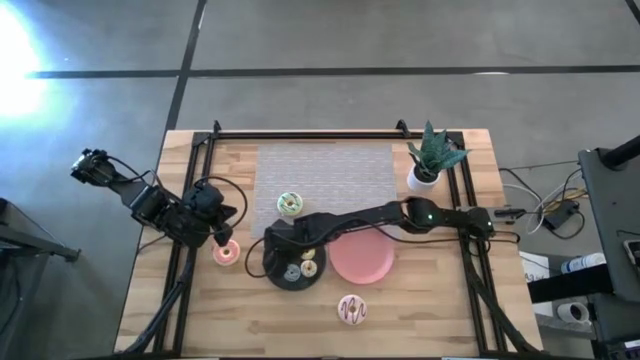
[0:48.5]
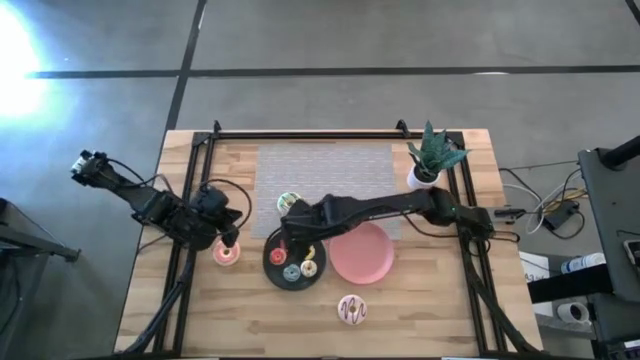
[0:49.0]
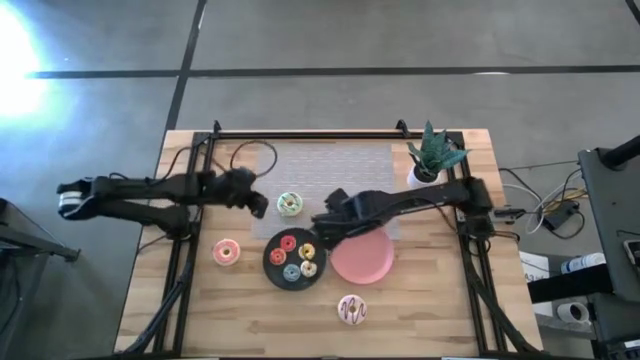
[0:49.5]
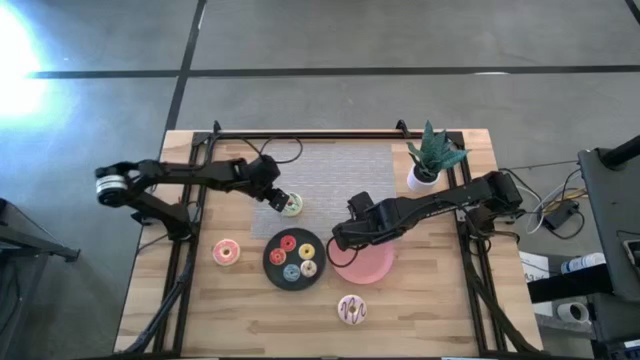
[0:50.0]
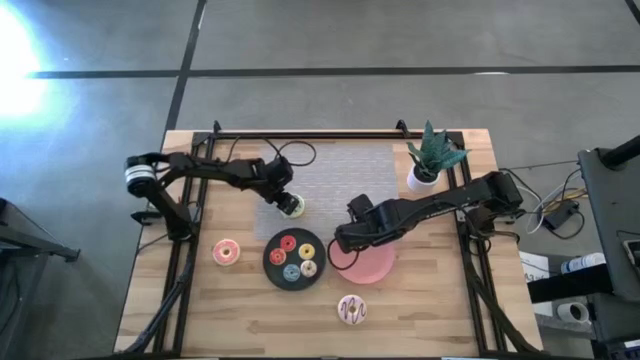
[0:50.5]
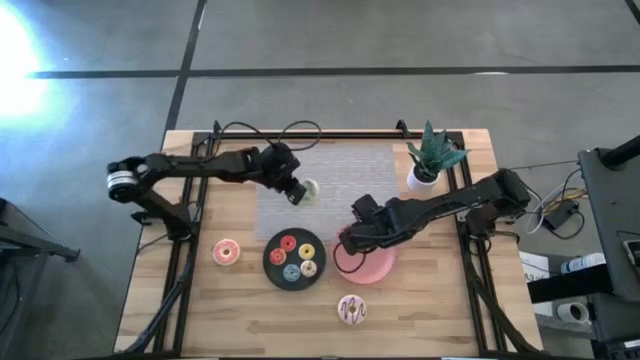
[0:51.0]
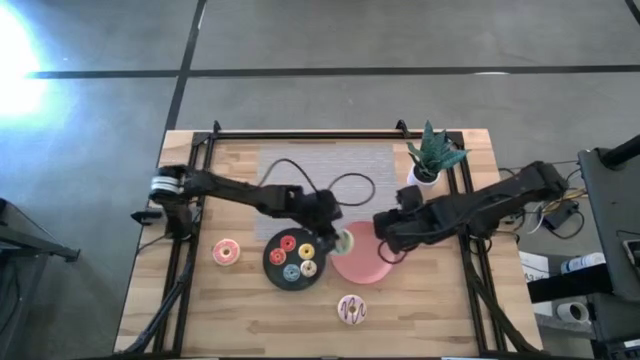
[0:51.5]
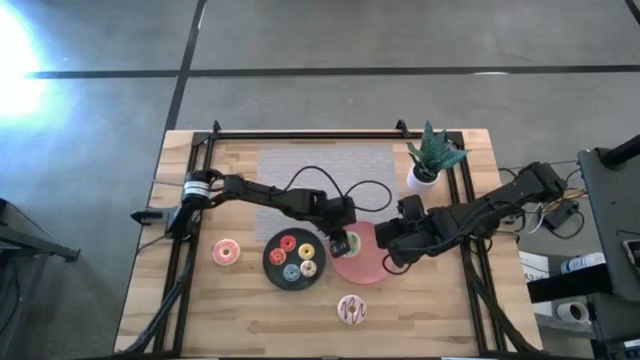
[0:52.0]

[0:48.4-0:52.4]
Task: Pick & Place donuts
Put the big blue doughnut on the pink plate

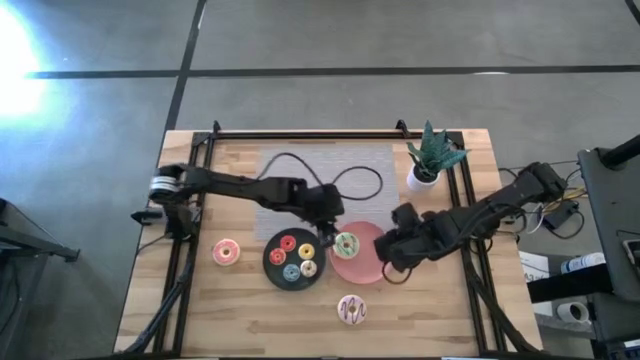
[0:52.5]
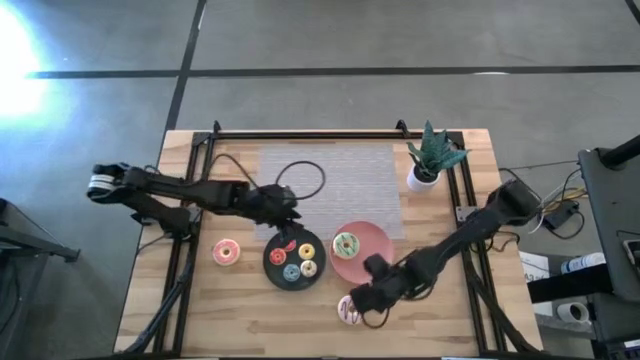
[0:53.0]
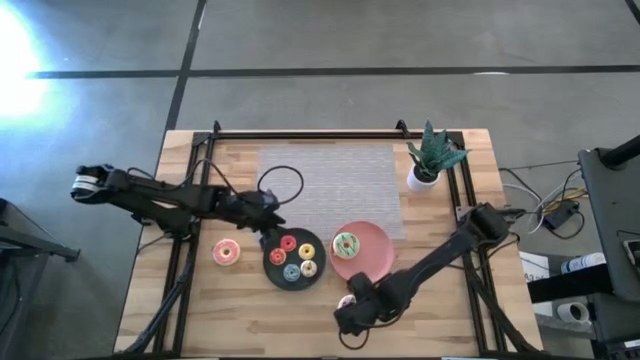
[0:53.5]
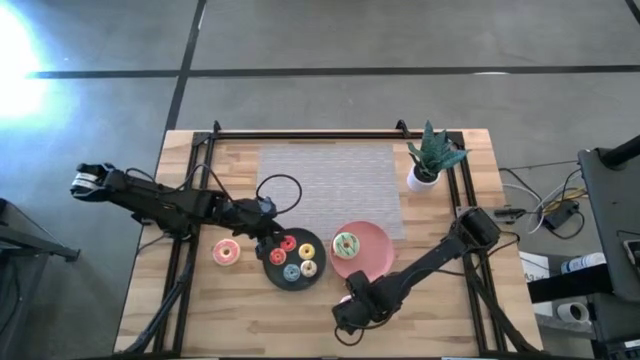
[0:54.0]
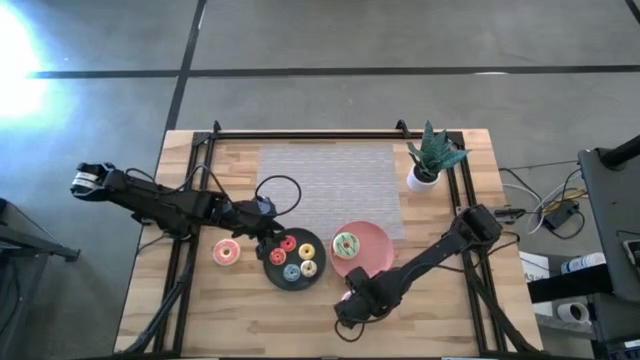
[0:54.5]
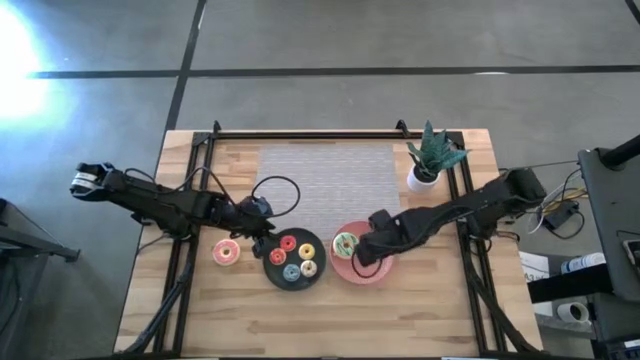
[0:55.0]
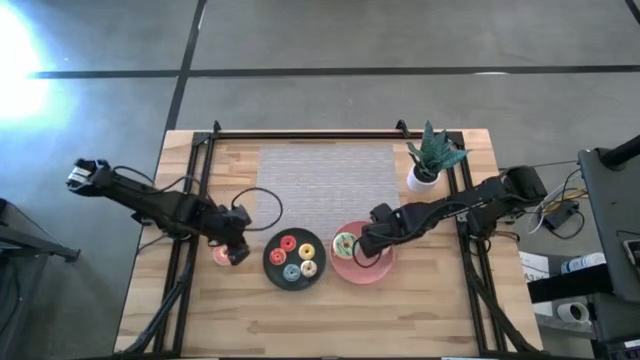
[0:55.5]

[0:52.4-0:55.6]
Put the big purple doughnut on the pink plate

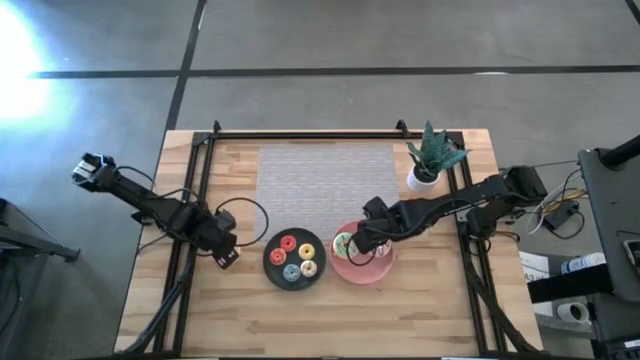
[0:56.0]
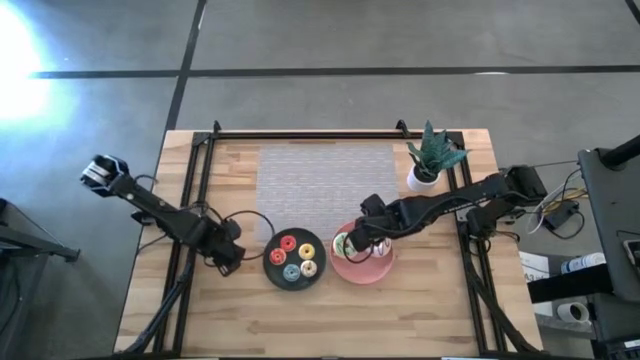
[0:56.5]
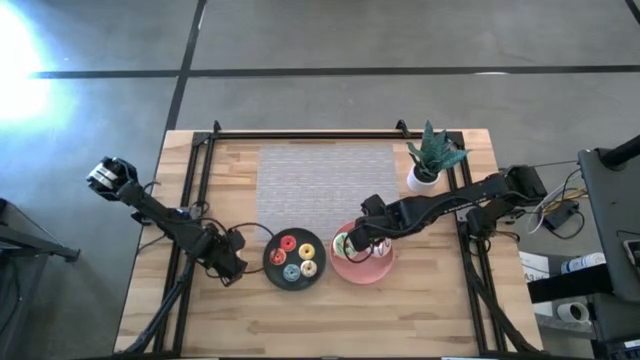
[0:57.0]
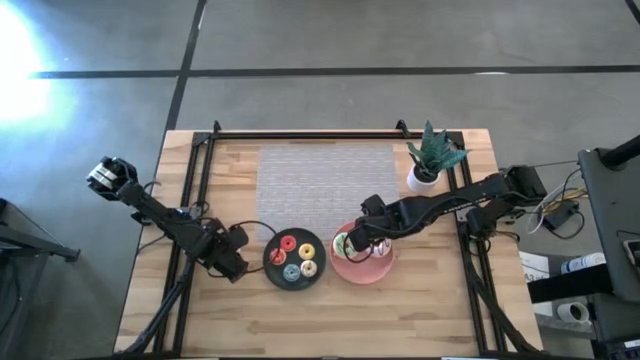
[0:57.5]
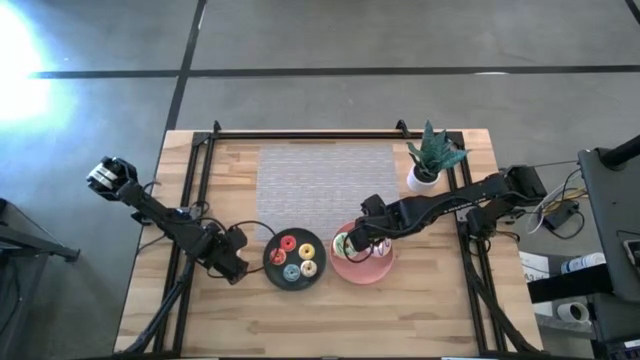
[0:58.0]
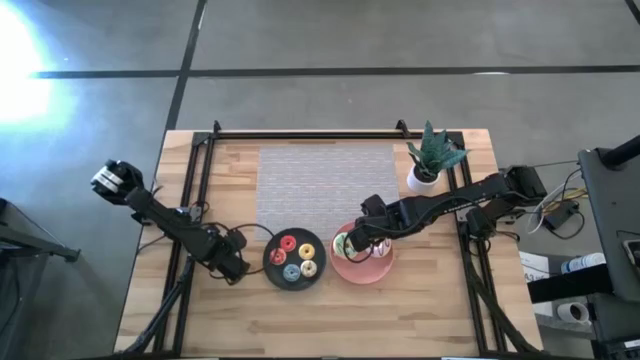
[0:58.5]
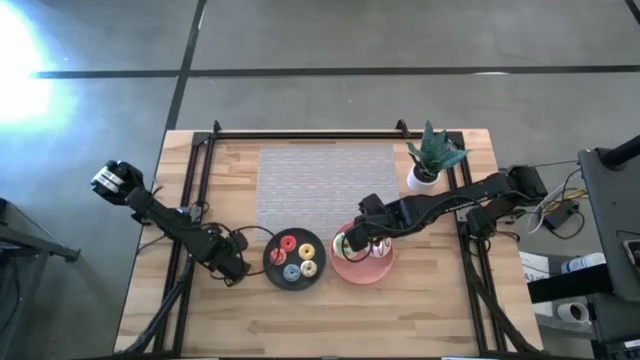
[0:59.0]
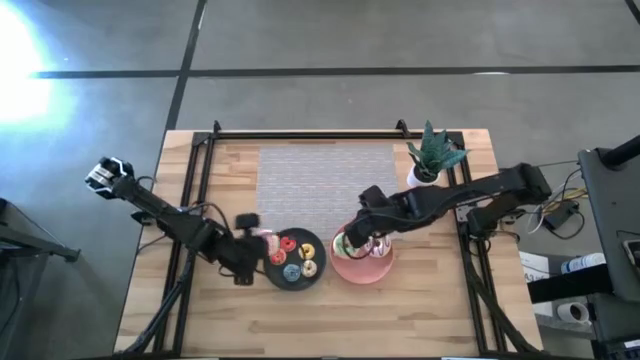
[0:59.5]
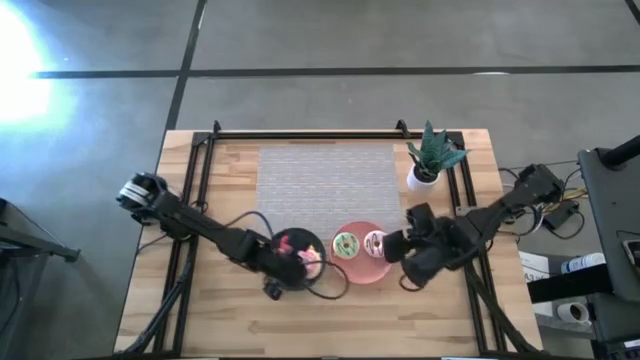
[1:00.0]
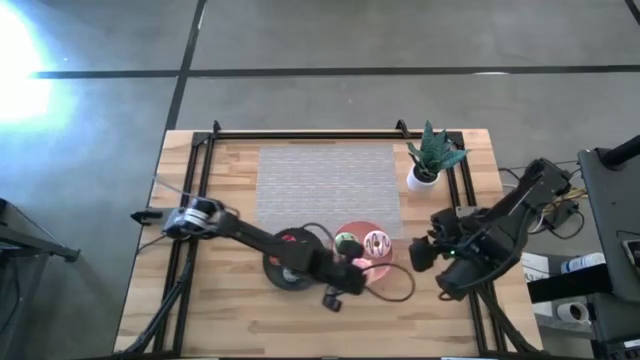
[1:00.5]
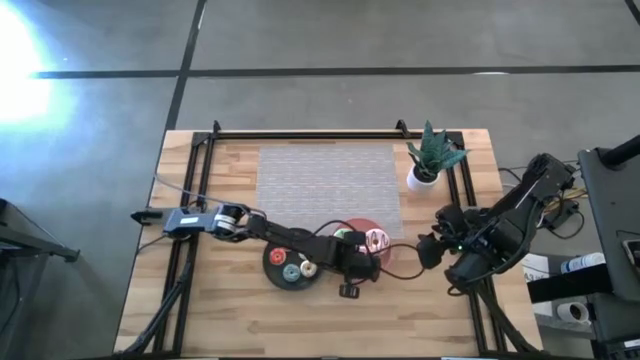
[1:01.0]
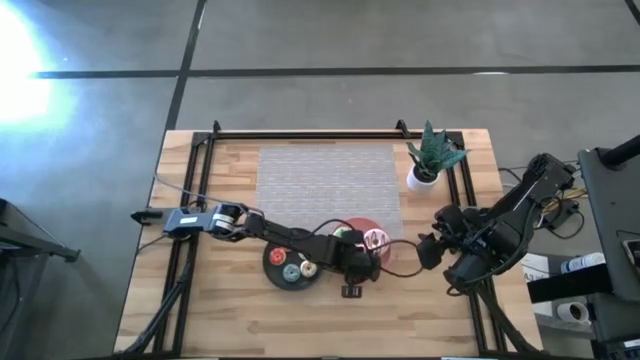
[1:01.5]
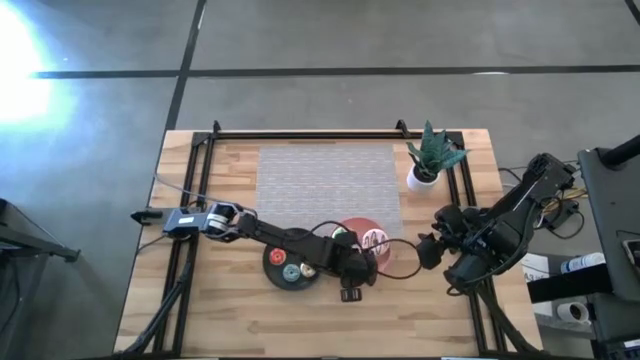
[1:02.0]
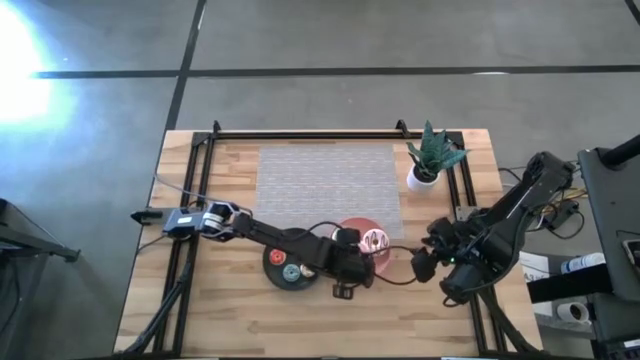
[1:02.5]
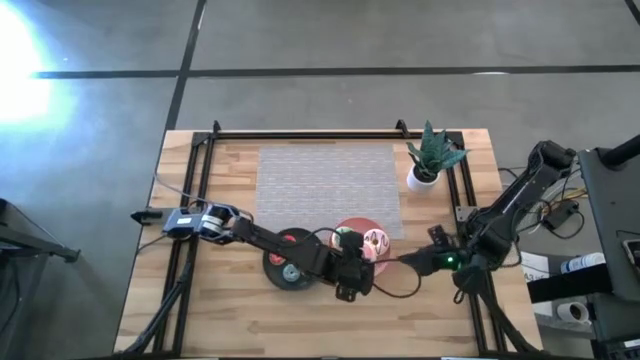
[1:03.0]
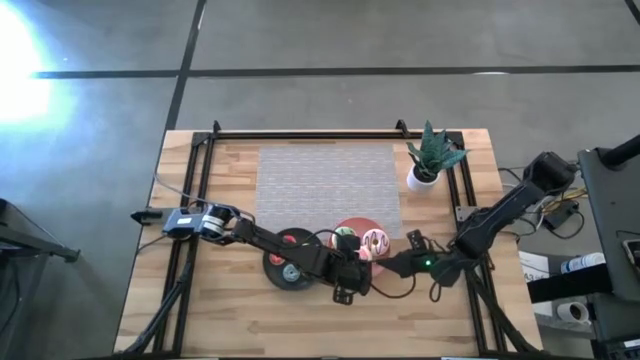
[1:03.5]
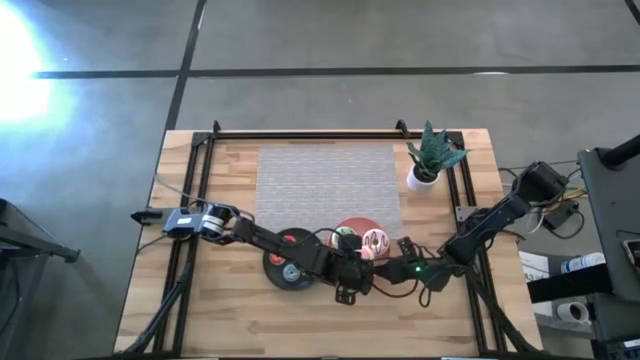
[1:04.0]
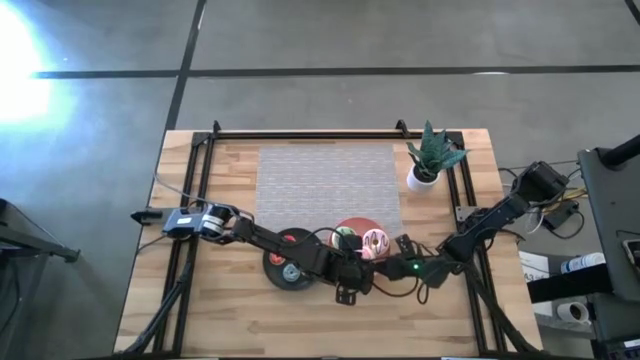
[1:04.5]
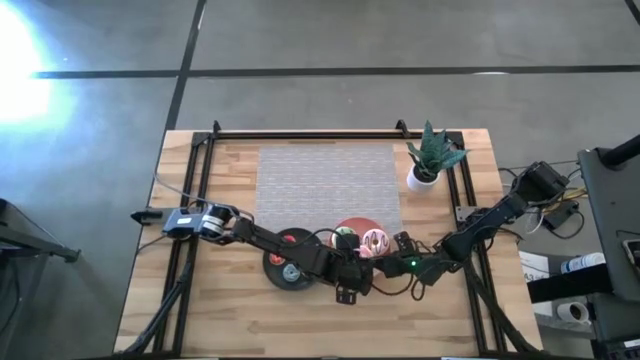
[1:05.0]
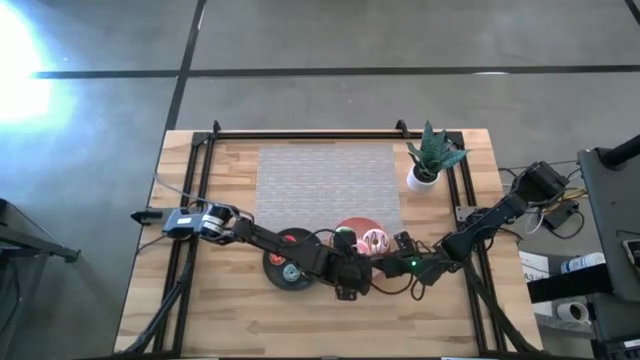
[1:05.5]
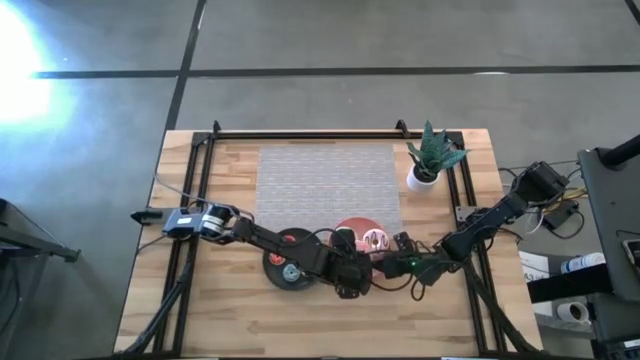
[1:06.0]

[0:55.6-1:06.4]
Put the big pink doughnut on the pink plate

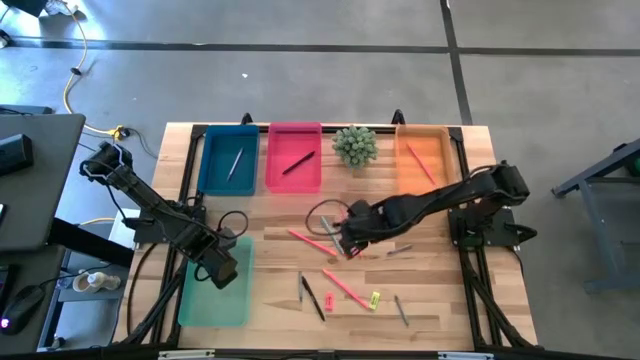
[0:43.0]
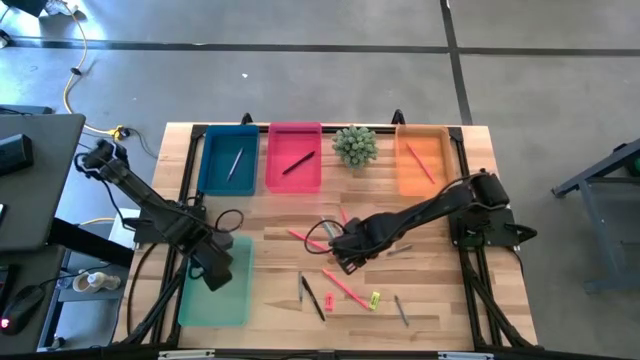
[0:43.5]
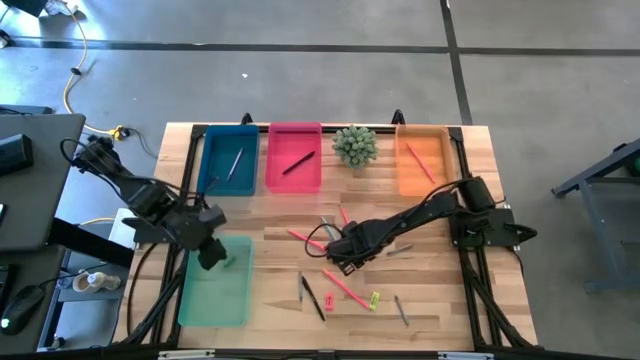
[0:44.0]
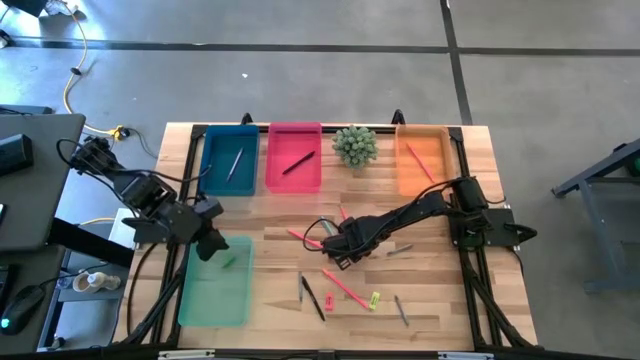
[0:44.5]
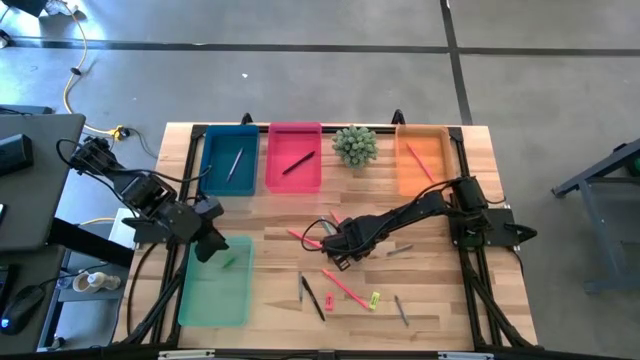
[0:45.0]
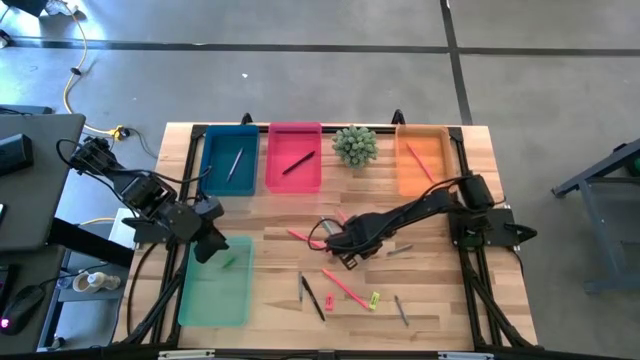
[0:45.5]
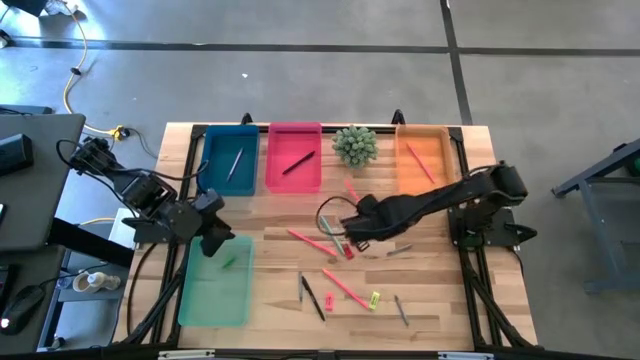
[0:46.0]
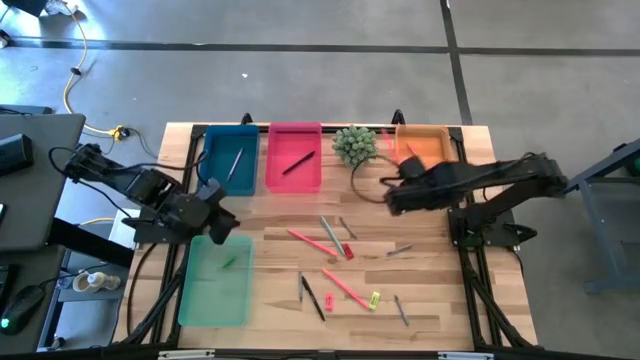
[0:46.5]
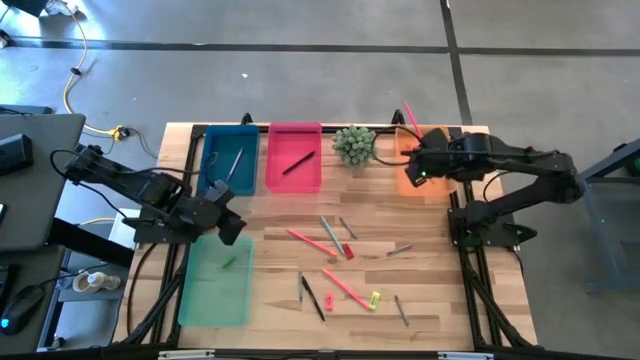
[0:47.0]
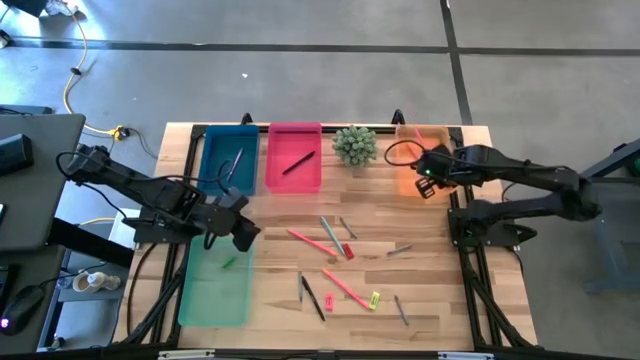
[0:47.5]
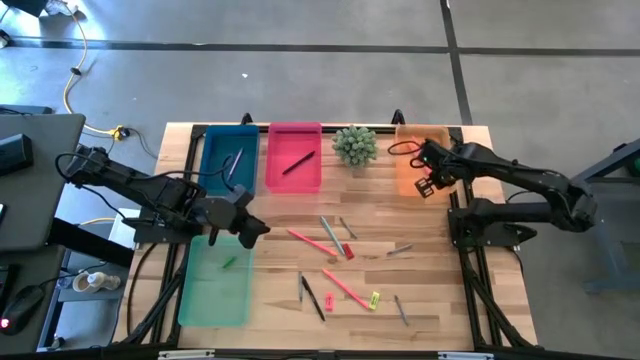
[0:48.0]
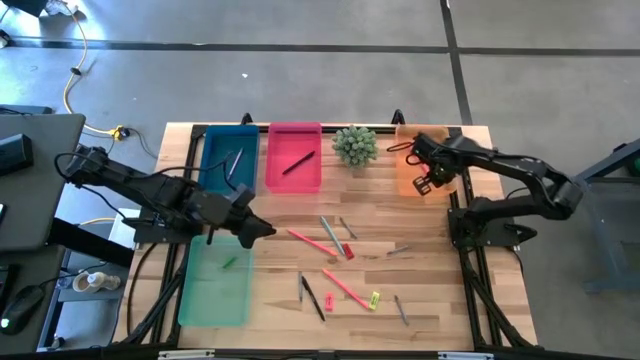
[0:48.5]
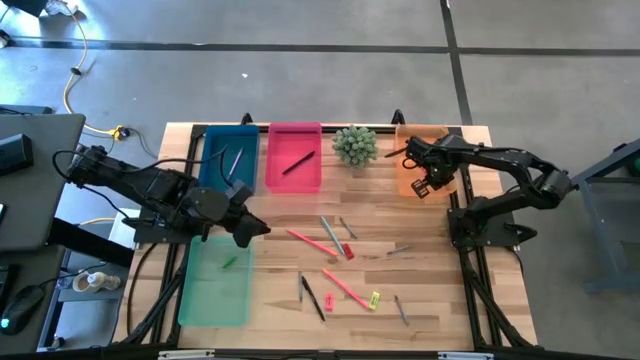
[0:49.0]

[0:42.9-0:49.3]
Task: Sort crayons/erasers/pens/pencils in bins
Put the pink pencil into the orange bin
